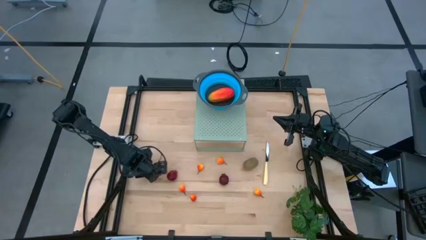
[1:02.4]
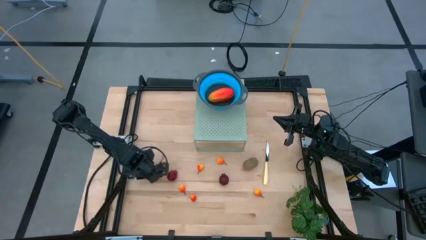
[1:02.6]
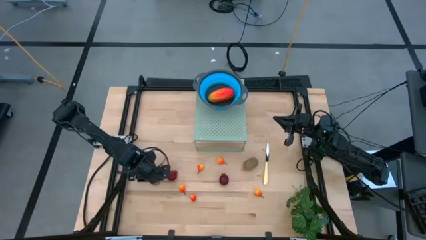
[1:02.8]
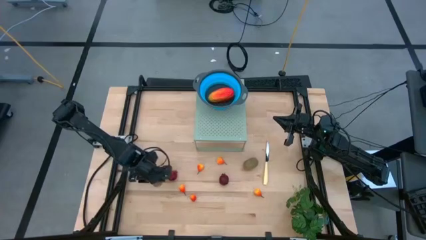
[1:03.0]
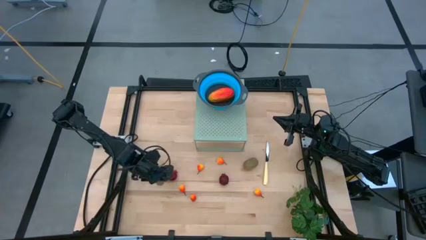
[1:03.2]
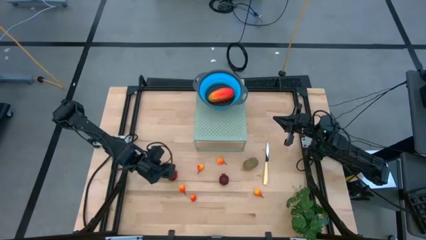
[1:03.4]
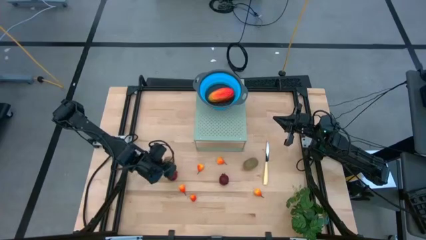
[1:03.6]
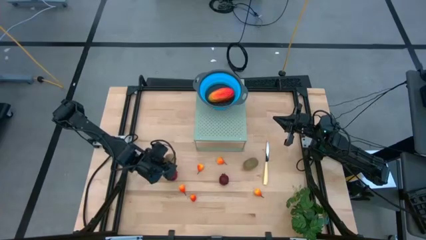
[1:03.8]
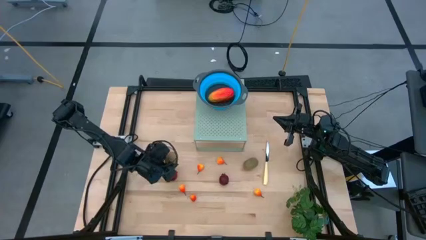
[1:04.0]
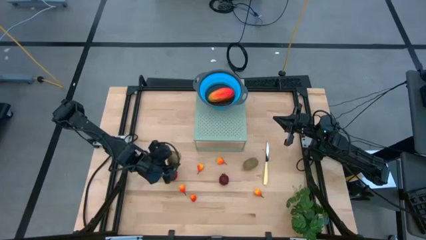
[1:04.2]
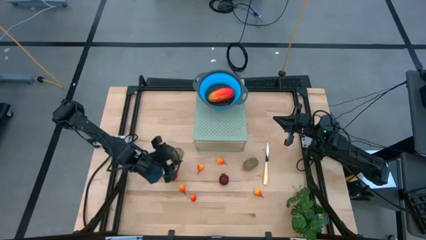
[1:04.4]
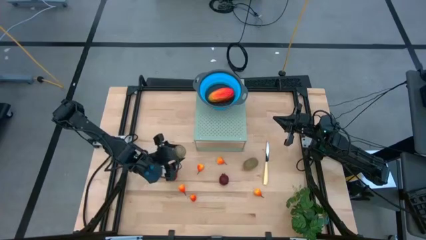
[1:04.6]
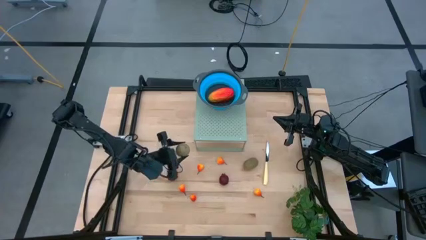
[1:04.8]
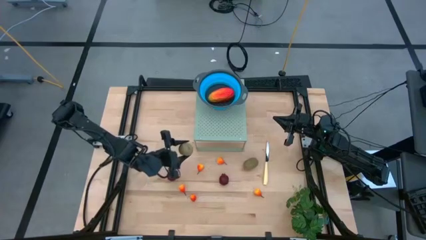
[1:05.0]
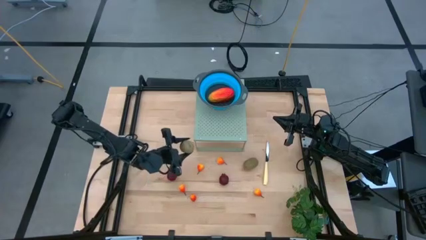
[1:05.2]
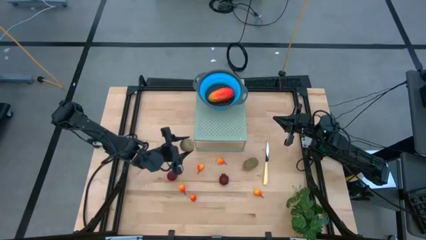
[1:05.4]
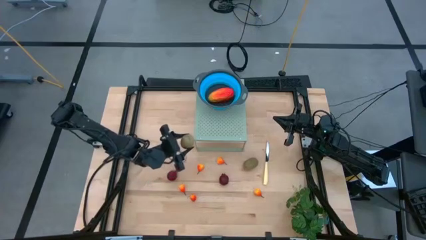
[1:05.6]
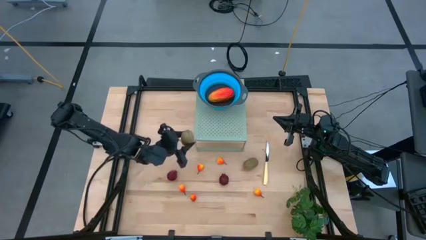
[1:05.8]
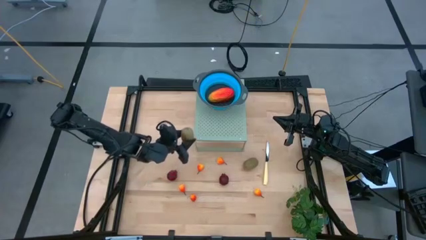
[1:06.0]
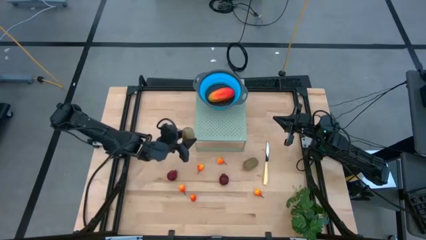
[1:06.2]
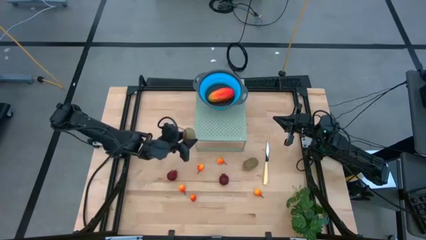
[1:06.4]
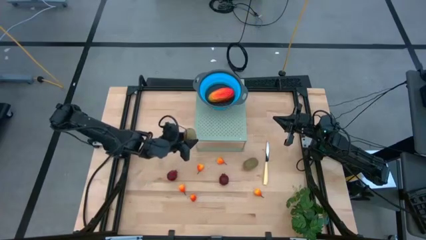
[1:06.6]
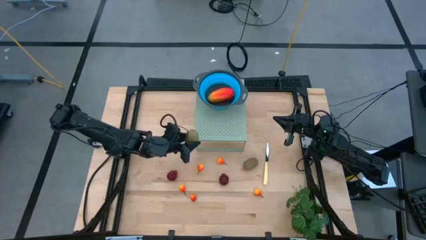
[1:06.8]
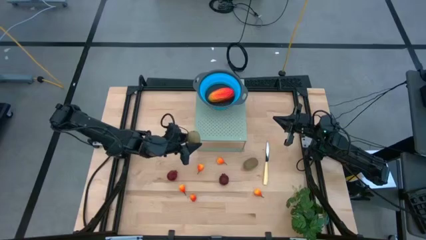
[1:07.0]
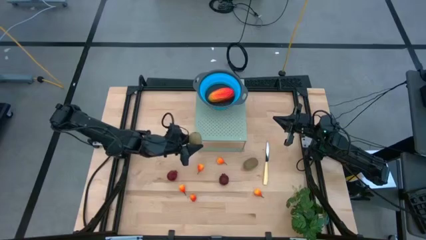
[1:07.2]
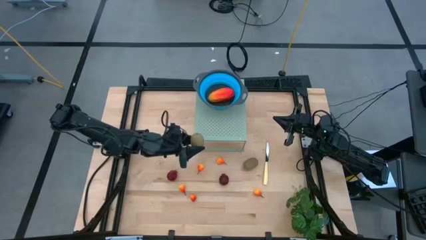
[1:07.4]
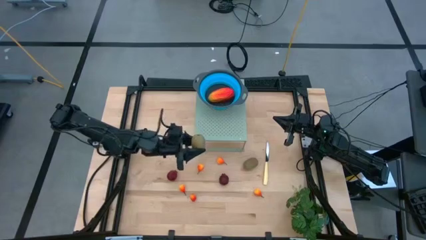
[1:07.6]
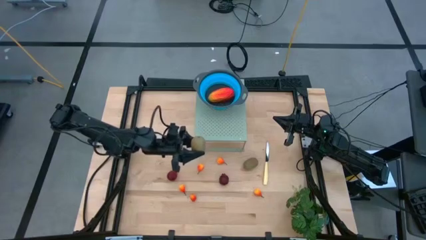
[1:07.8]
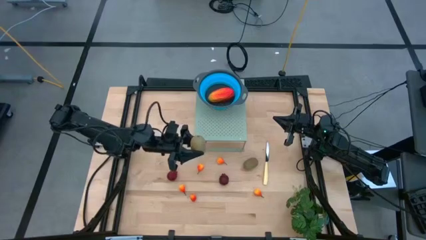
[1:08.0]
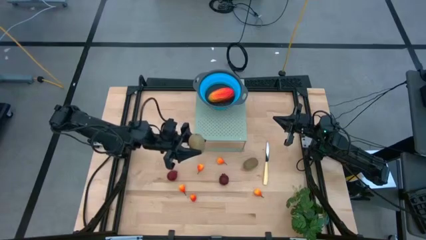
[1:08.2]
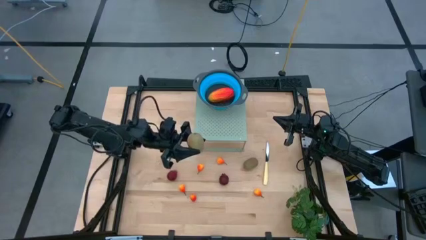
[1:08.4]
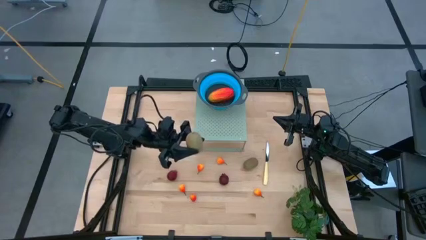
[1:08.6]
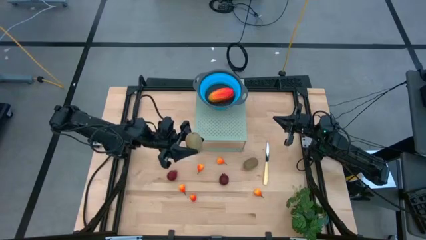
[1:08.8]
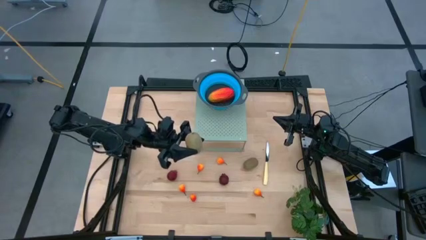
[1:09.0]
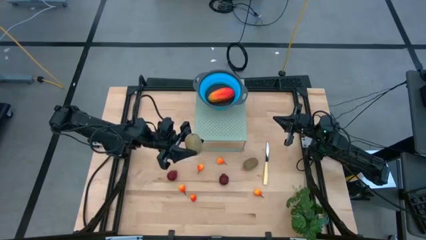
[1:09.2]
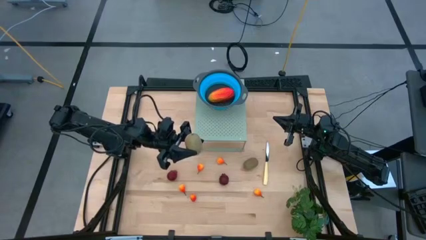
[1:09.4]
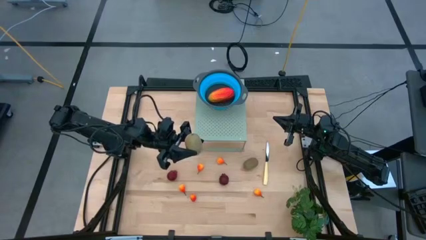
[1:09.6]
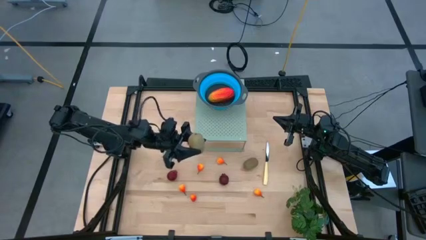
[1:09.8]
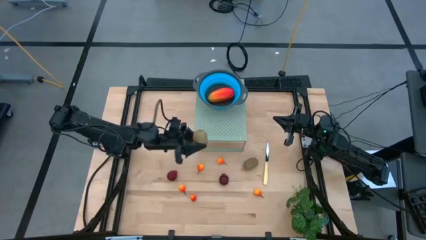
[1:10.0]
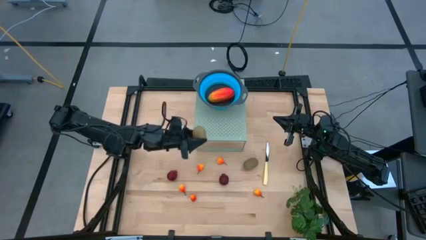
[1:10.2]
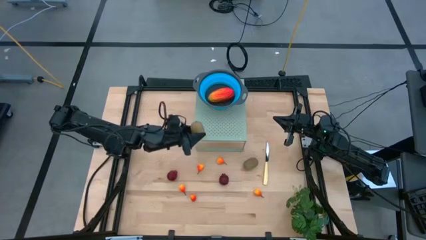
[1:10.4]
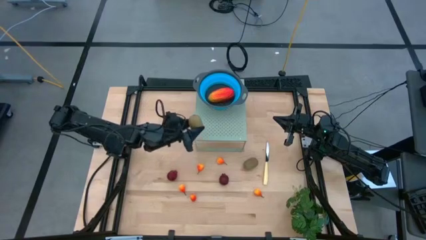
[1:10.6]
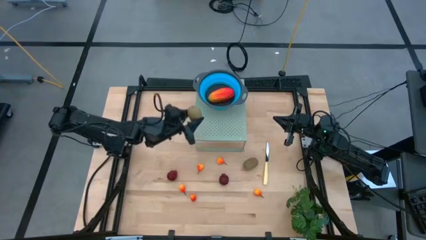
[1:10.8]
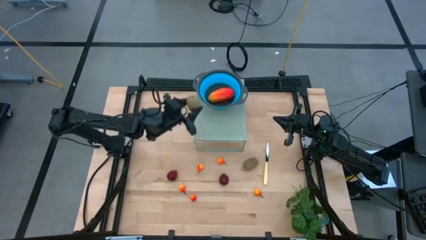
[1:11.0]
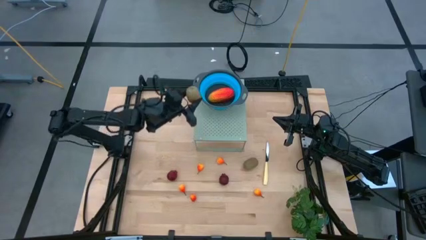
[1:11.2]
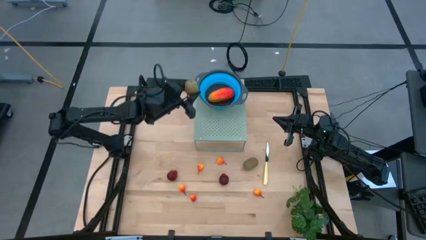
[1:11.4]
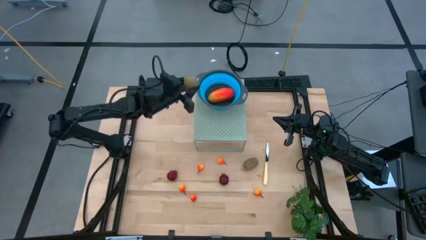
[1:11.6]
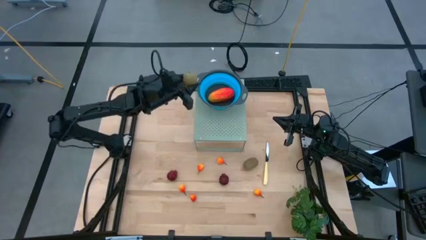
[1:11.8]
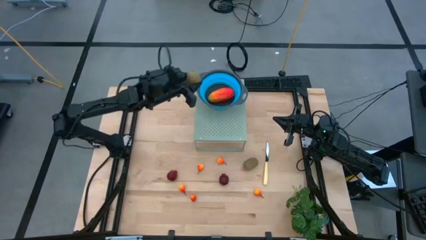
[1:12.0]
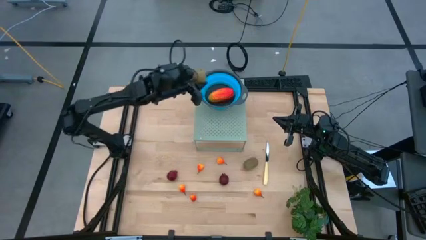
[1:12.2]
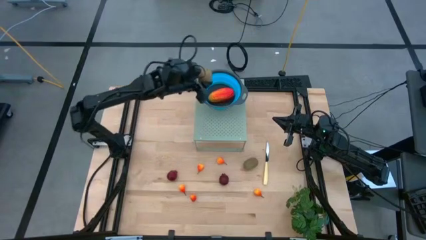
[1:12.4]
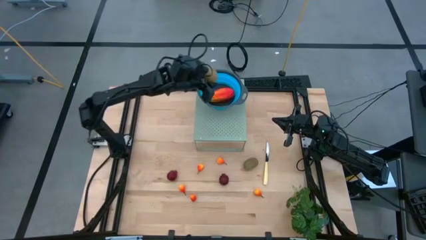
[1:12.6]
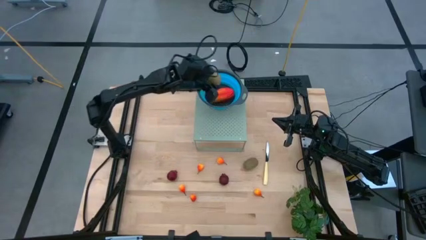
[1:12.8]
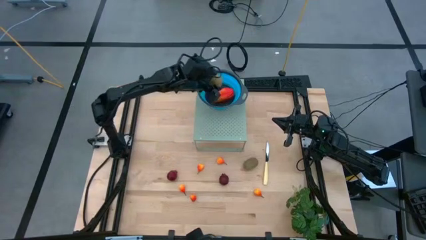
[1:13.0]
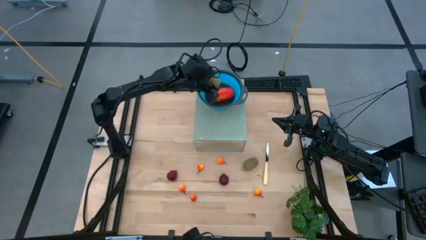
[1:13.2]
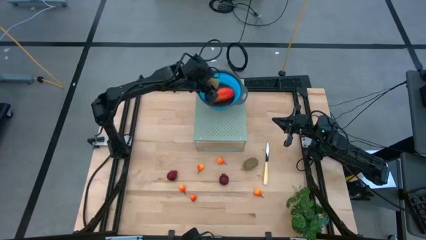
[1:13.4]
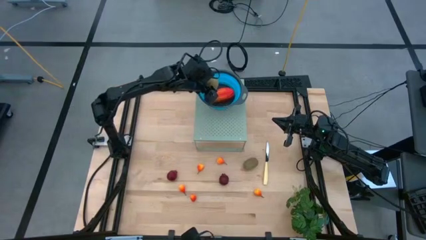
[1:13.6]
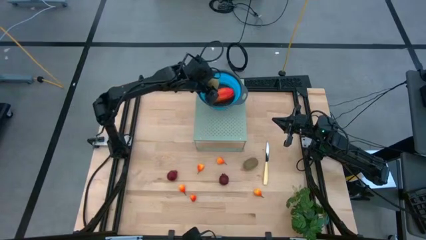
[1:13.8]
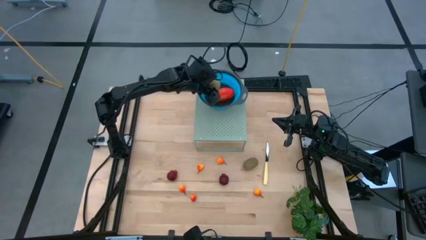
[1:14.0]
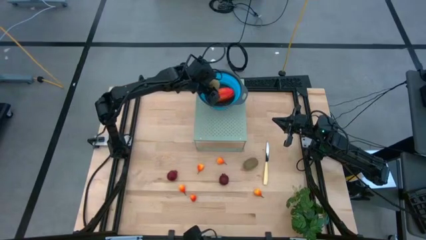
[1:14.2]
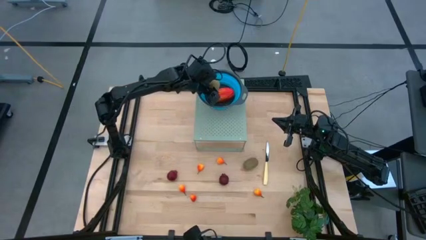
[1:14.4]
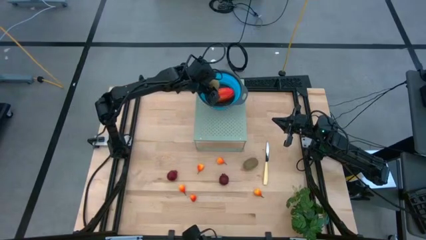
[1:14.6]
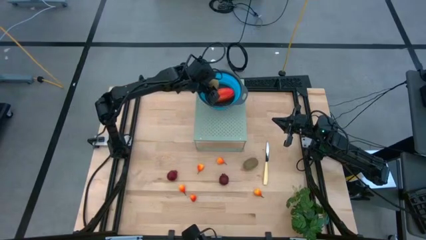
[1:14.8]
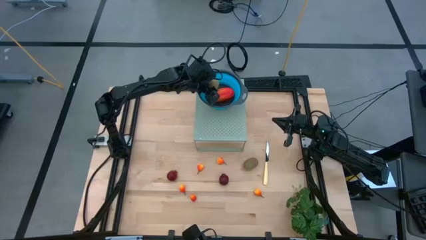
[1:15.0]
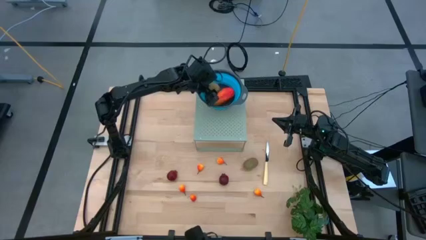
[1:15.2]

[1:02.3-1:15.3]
Task: Pick & Place Fruit
Put the kiwi into the blue strainer bowl on the shelf
